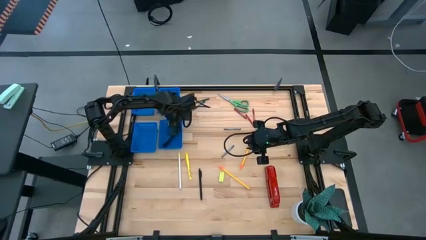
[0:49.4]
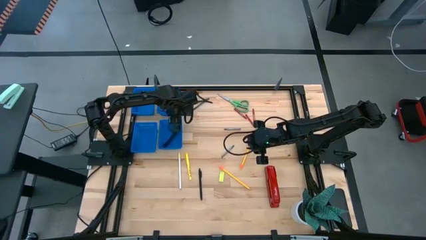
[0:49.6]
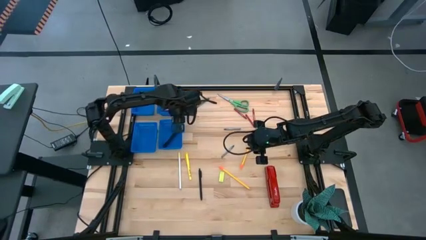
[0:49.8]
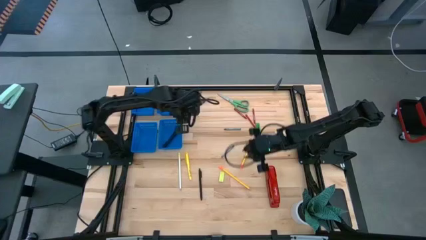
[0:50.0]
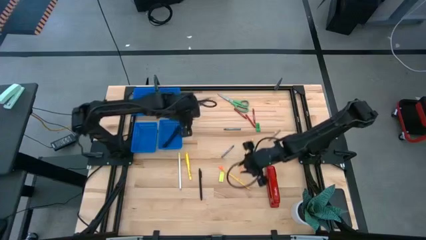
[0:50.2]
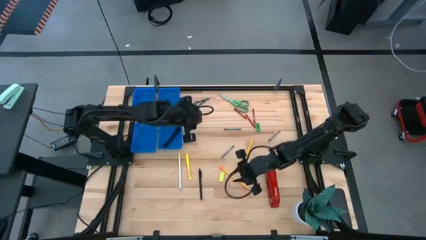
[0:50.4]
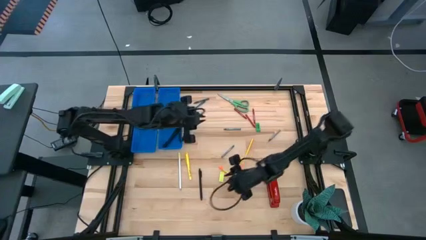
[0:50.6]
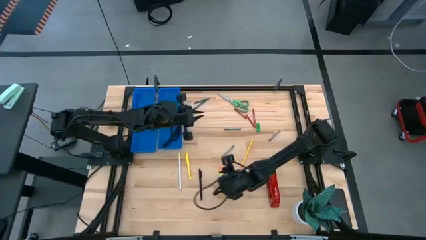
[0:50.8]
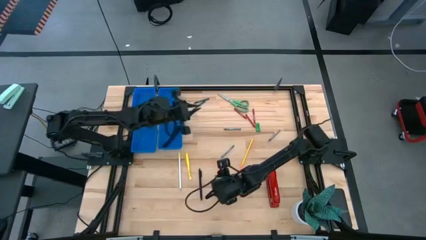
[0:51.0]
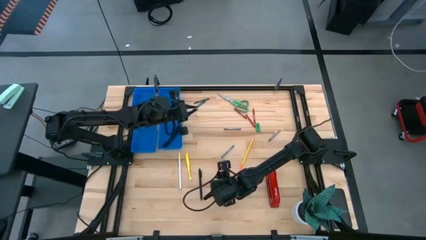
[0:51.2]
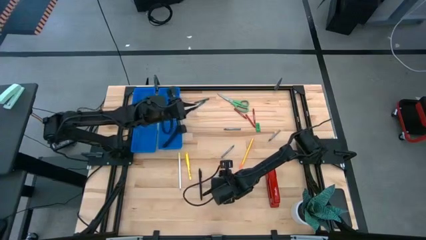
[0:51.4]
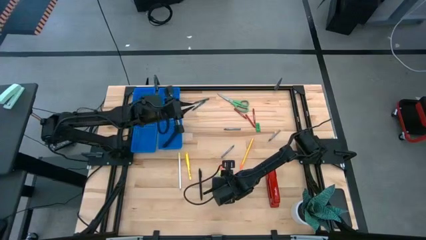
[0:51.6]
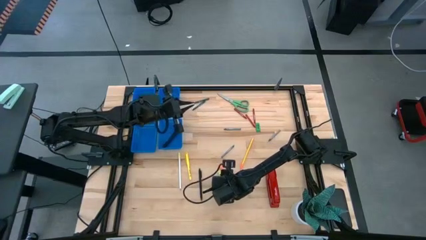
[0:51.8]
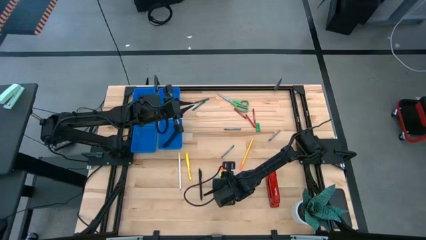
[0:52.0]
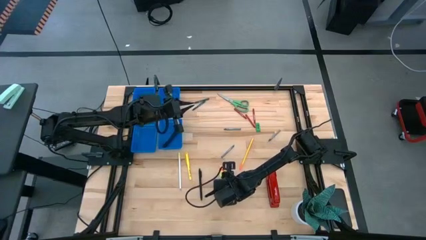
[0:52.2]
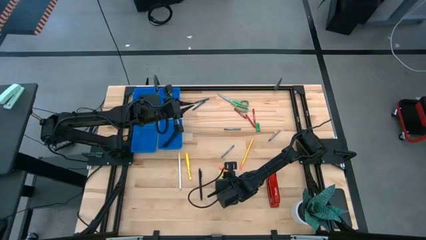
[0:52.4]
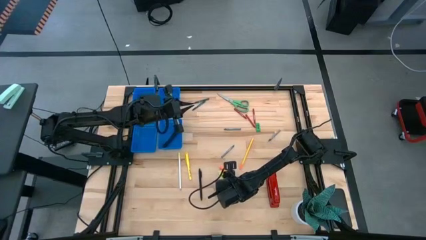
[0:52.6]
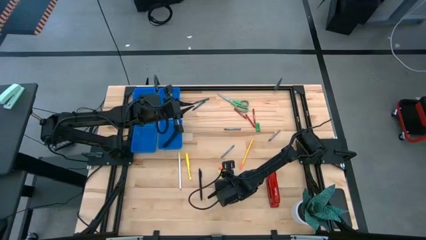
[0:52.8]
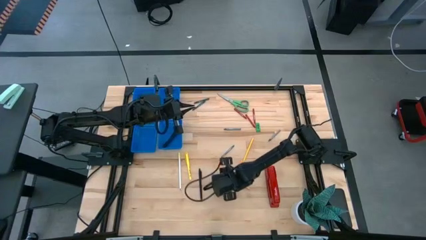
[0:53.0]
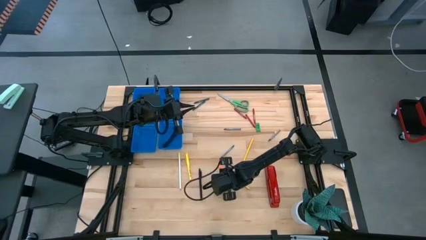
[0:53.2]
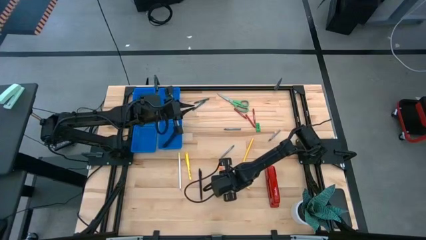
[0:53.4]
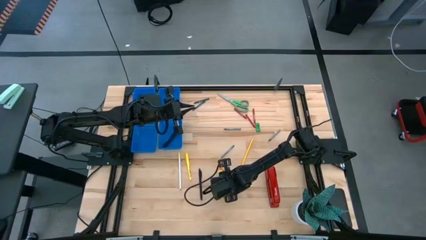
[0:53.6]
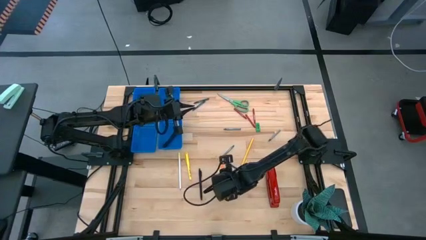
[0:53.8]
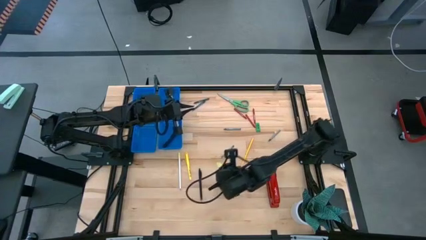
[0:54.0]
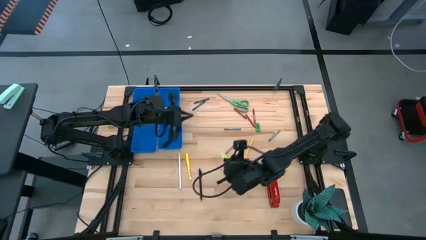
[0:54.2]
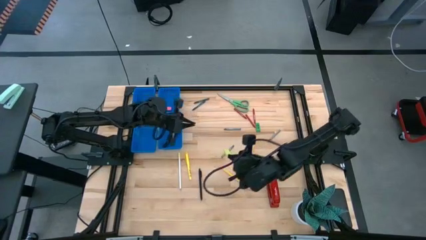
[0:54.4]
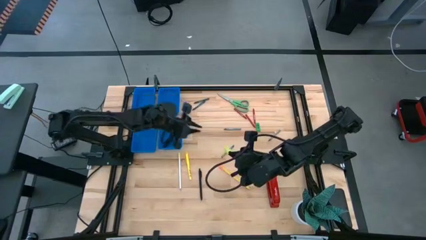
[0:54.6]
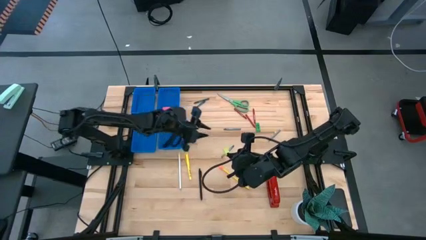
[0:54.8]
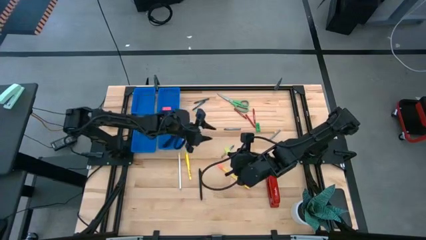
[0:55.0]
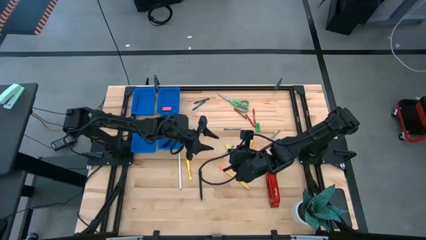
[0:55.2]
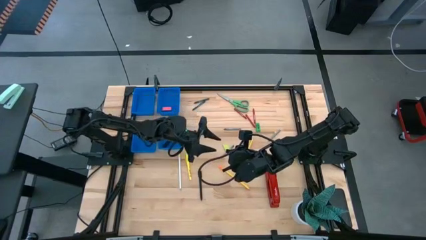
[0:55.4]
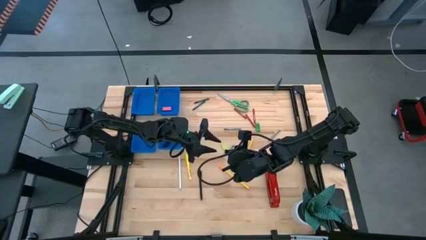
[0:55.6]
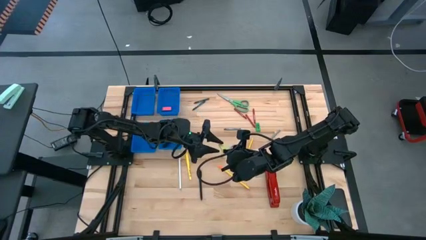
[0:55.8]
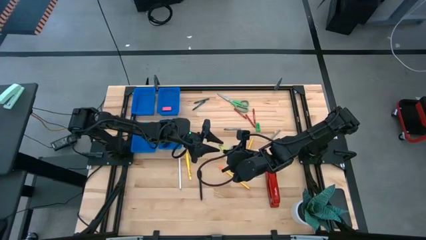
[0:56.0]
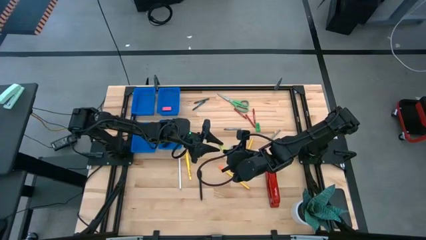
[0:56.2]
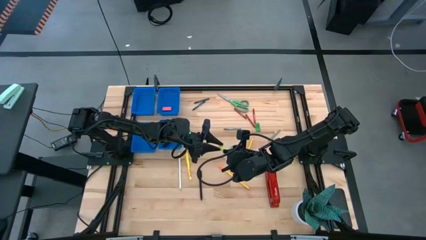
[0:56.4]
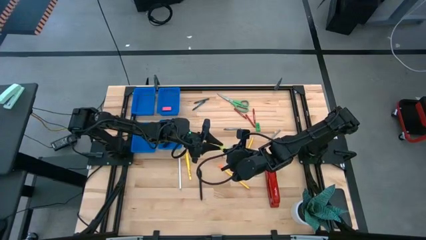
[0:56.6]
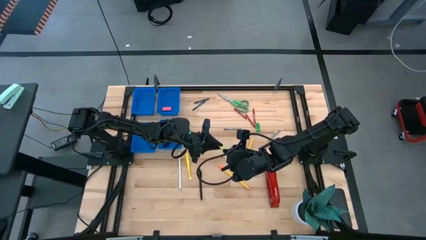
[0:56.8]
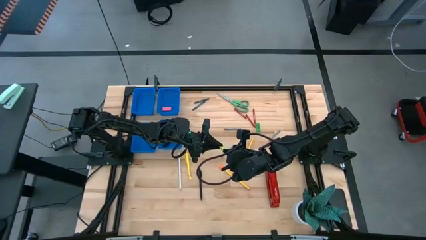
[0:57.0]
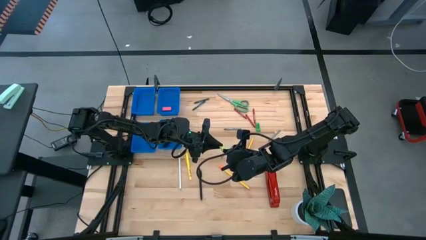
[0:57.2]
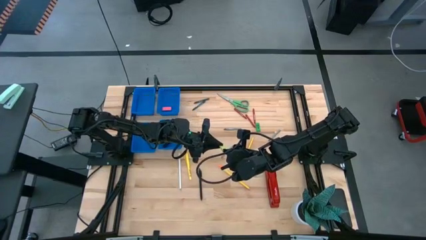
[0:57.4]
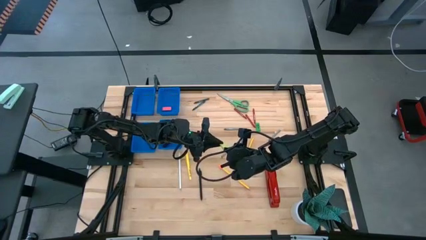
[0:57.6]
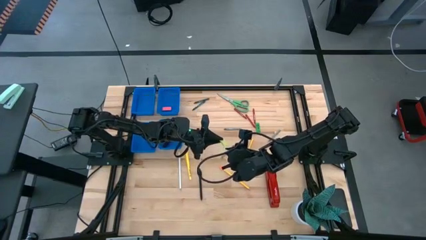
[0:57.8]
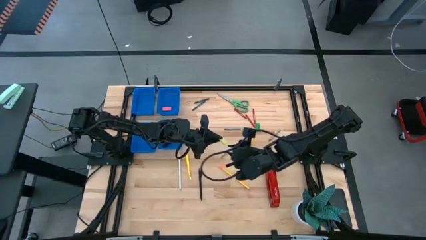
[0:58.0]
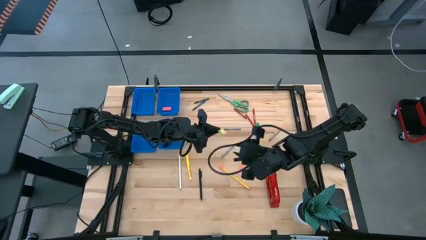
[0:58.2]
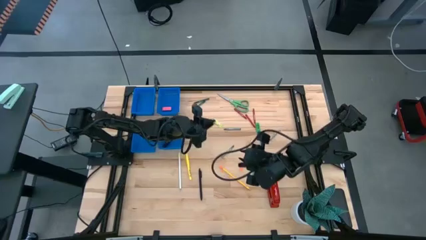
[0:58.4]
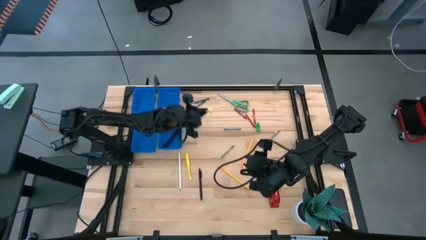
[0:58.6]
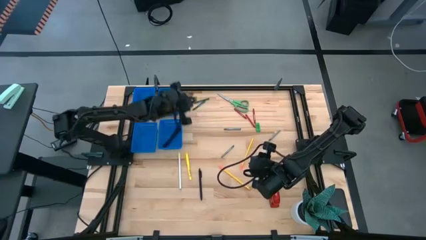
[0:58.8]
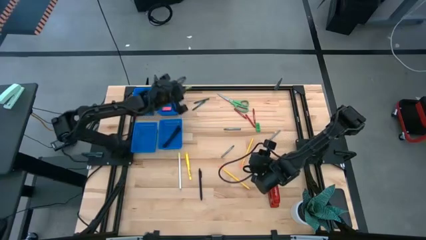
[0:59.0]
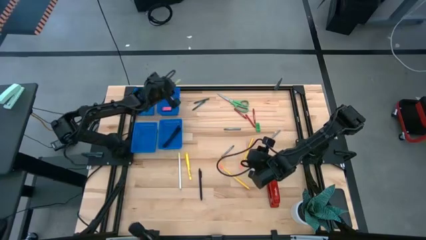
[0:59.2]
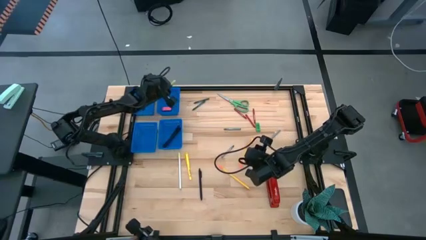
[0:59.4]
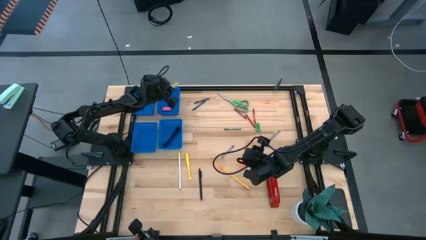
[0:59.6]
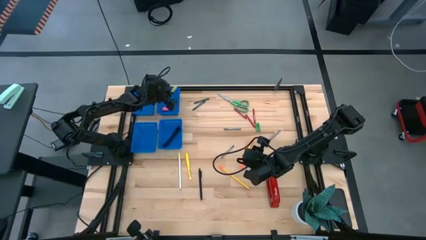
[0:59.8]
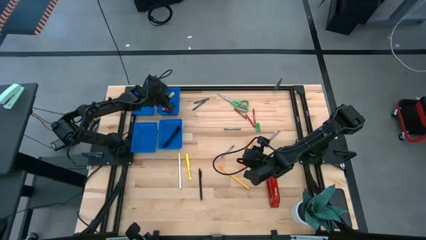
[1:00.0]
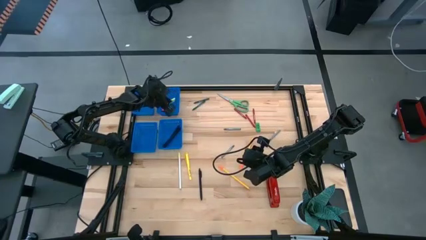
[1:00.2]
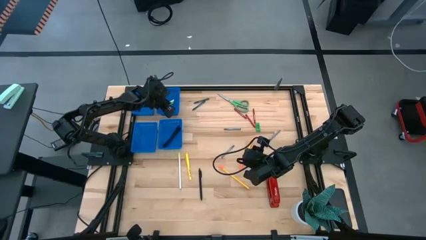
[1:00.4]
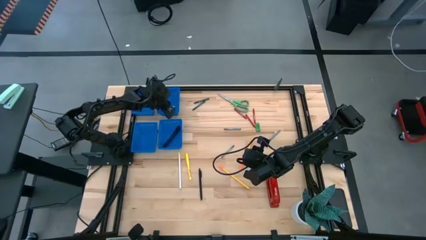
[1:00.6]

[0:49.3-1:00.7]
Task: Sort crayons/erasers/pens/pencils in bins
Put the yellow green eraser into the top right blue bin

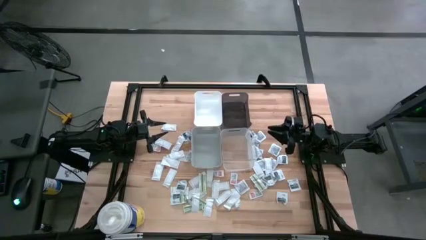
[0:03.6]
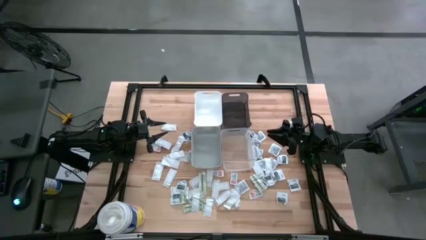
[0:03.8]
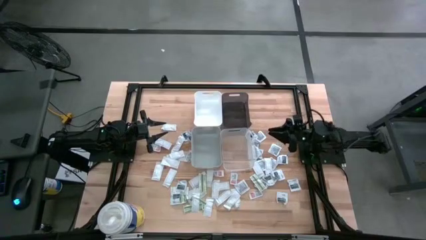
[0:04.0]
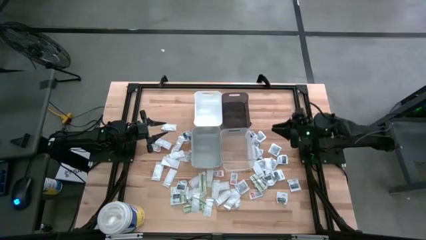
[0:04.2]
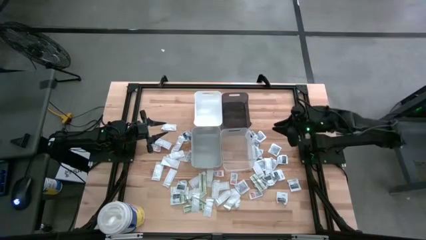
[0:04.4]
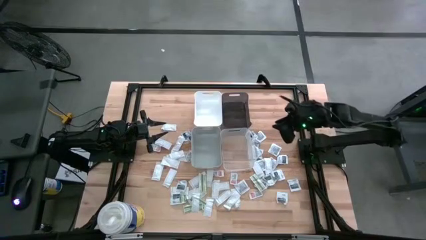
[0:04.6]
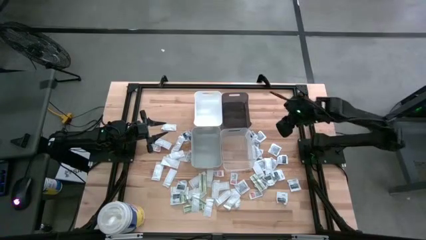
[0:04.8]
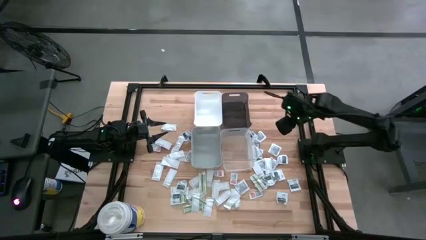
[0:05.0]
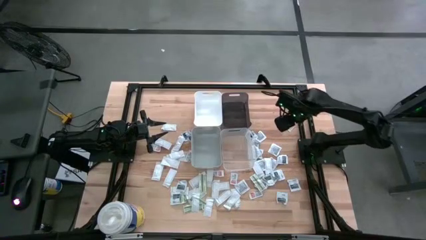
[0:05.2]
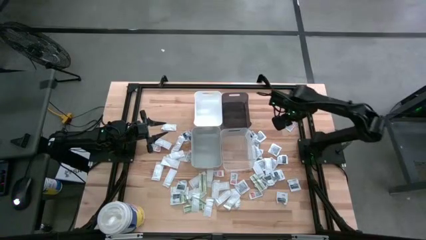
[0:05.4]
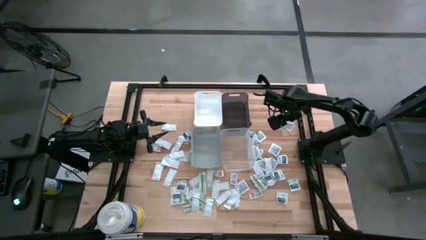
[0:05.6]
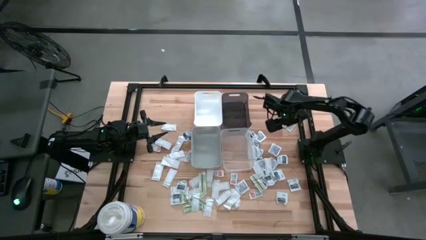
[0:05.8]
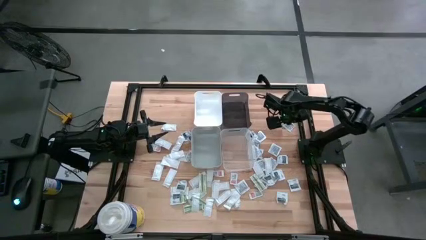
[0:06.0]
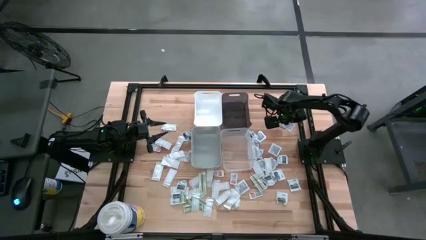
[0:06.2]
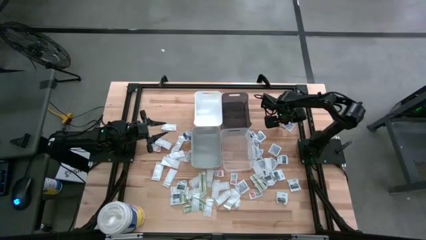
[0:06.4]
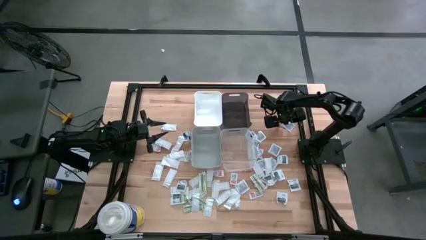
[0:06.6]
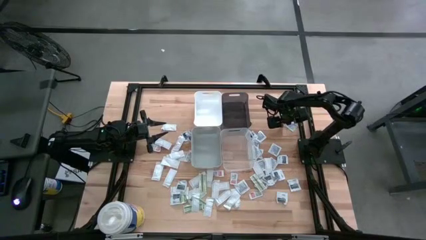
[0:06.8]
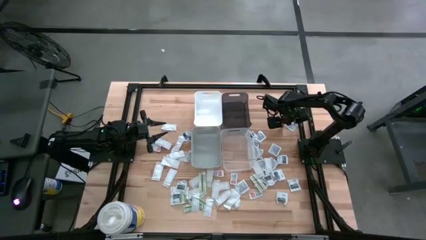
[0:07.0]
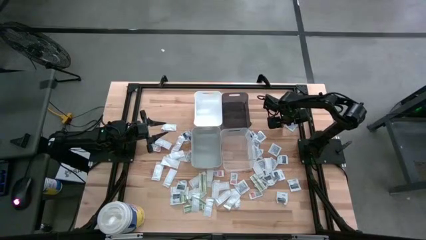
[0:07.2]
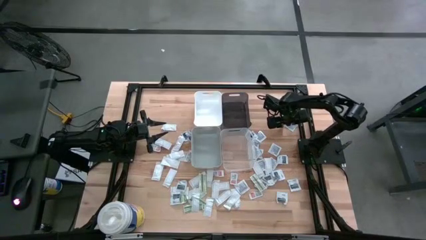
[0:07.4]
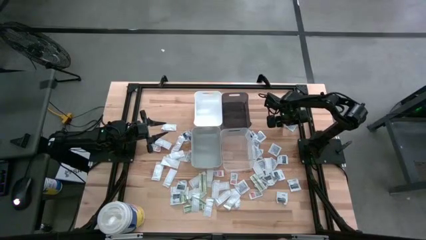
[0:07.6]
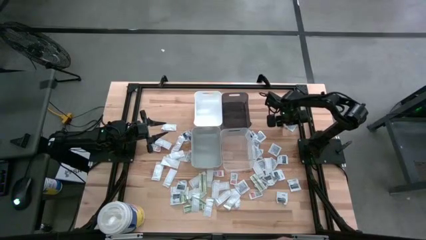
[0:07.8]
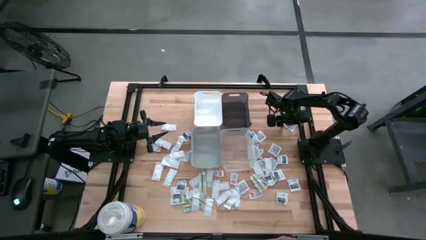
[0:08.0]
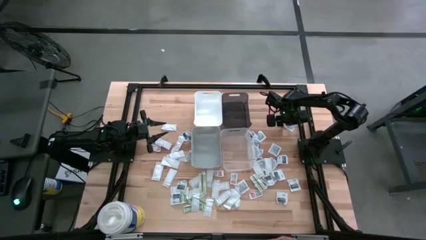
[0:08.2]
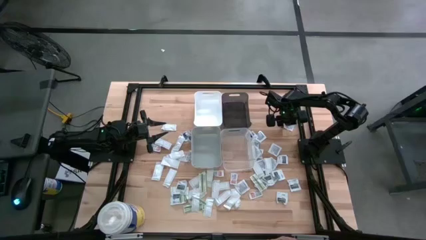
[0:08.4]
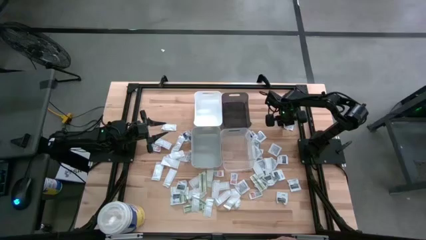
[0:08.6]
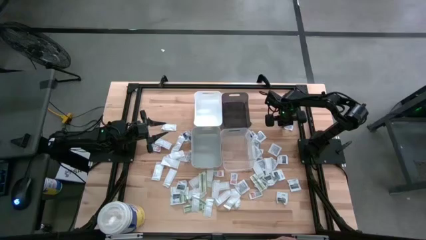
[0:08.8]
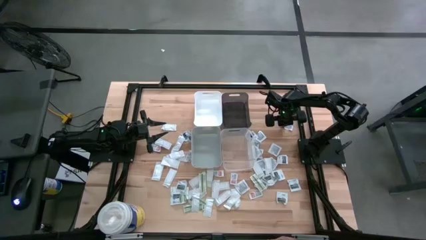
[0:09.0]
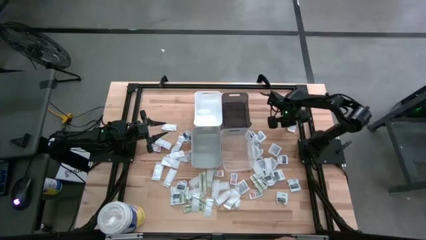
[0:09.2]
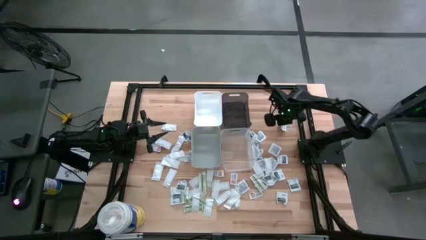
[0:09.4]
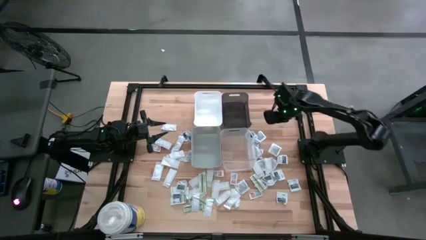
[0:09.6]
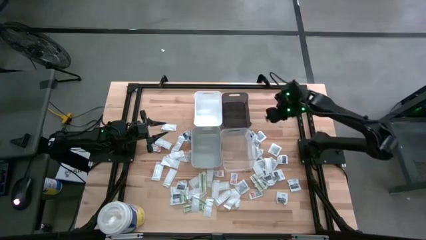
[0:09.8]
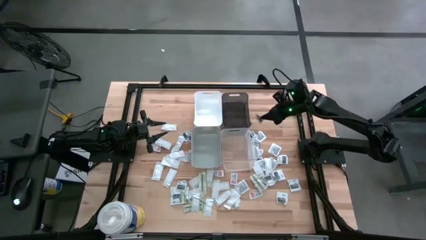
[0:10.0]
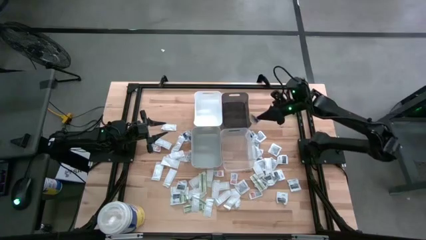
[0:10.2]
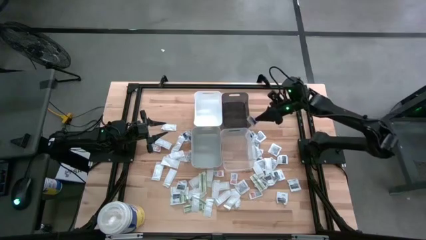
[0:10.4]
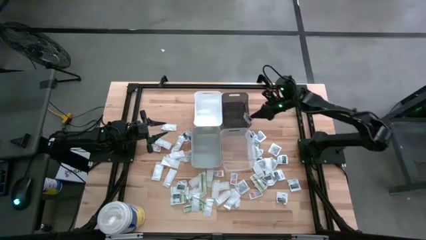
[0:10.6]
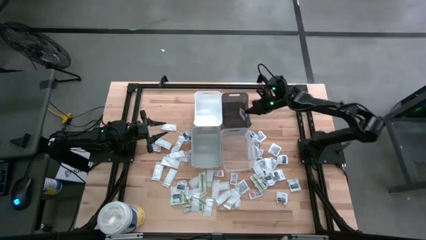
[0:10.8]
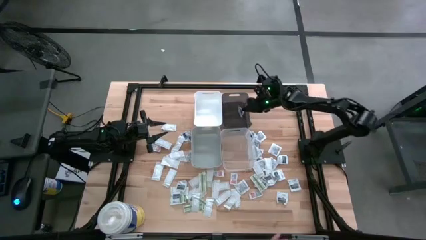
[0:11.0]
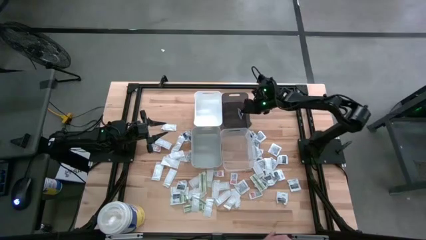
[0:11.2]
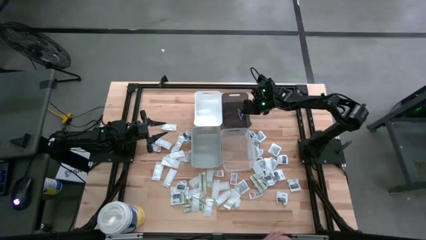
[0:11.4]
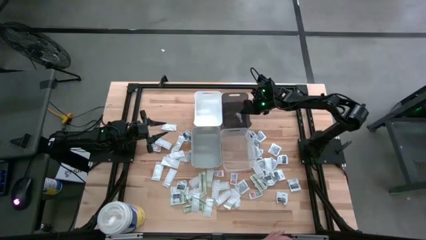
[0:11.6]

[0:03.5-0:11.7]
Task: Pick & Place First Aid Supplies
Put the blue alcohol pad into the black bin
